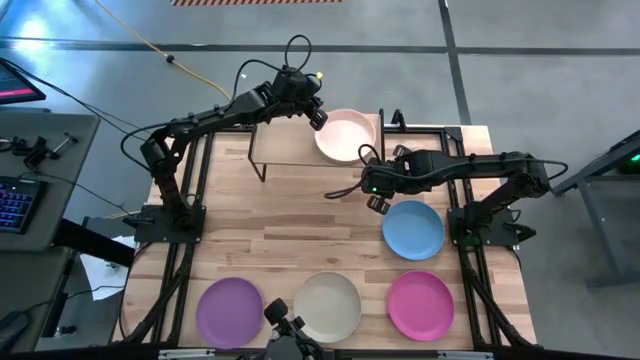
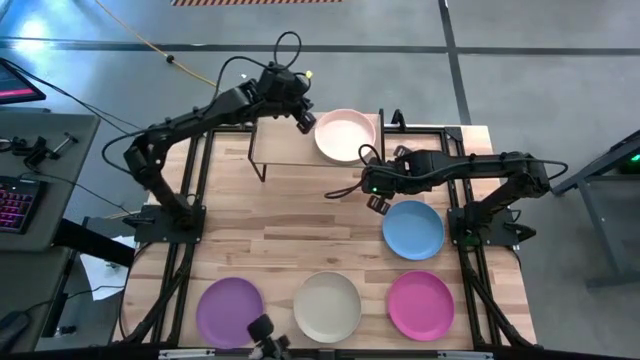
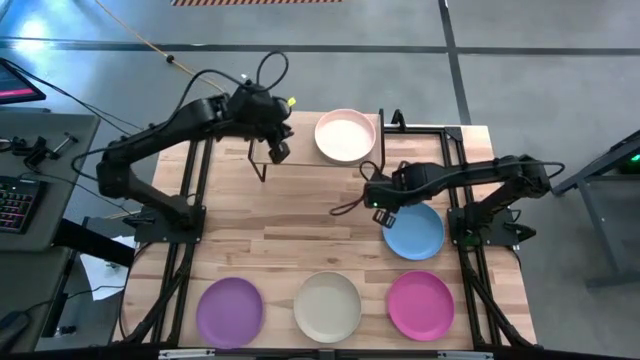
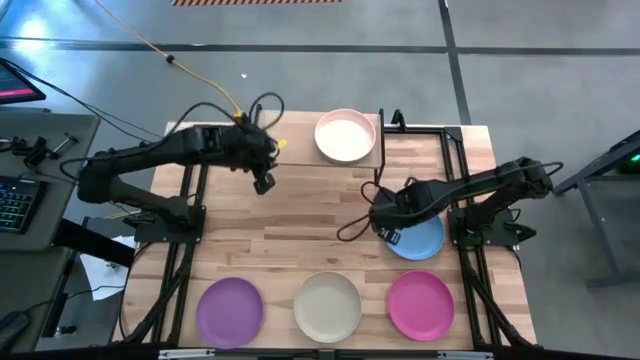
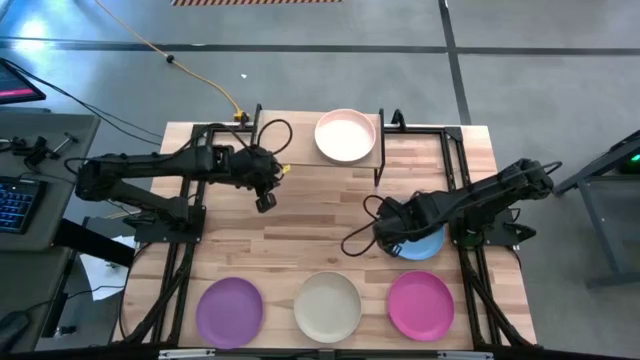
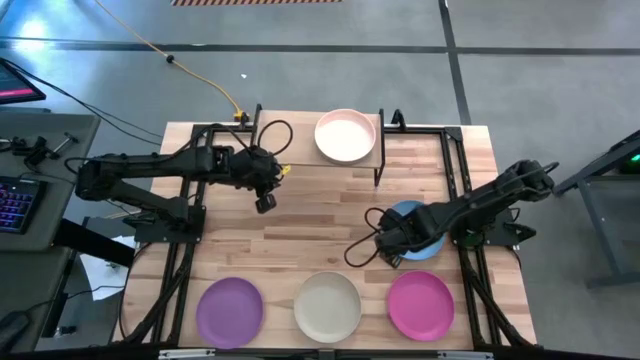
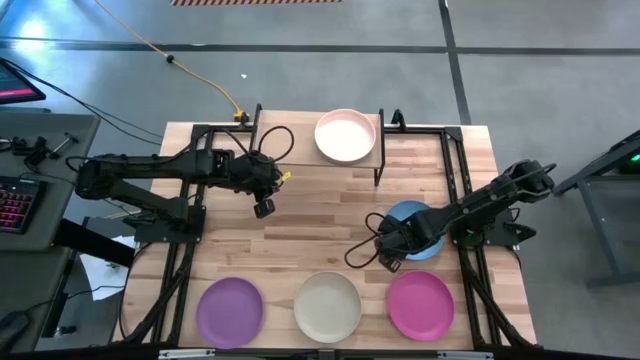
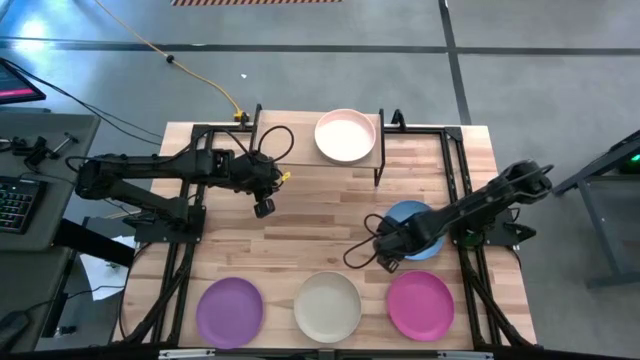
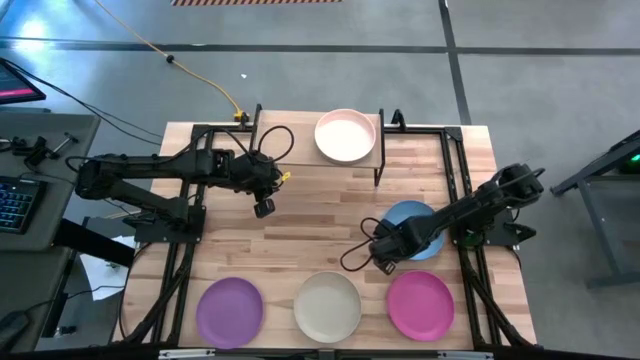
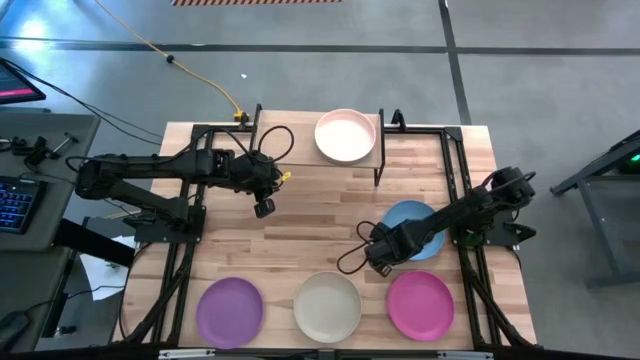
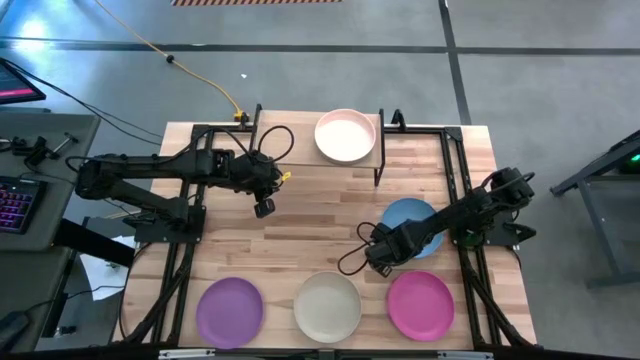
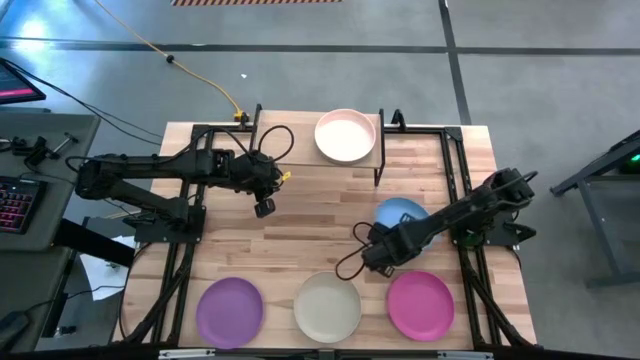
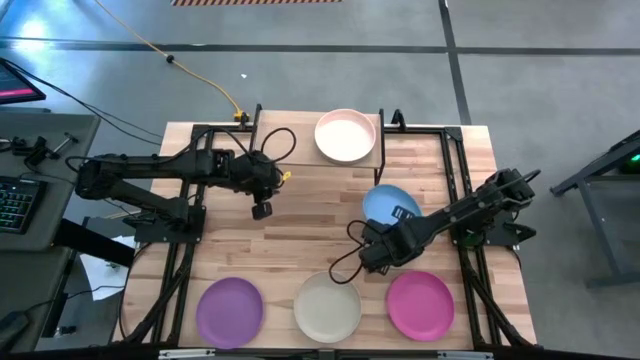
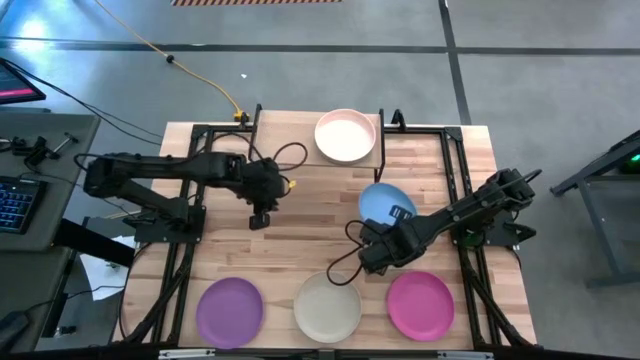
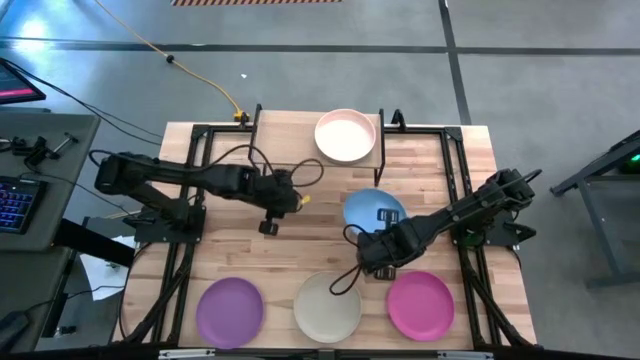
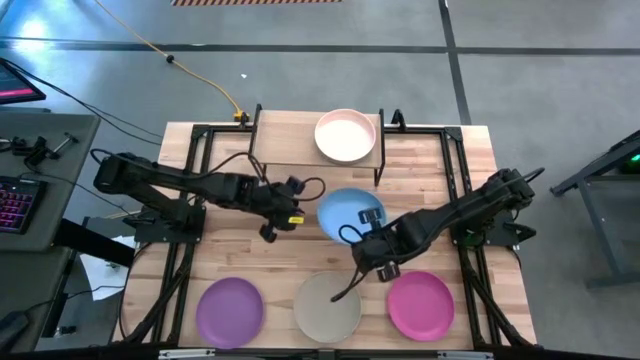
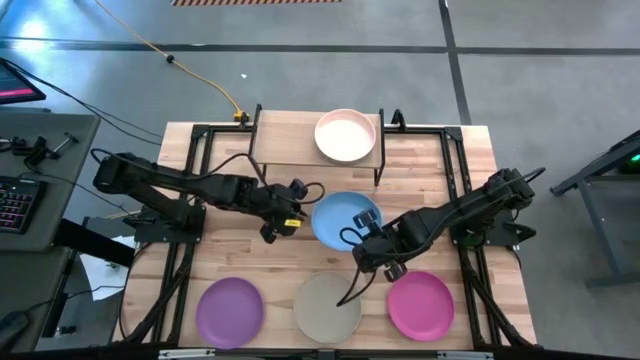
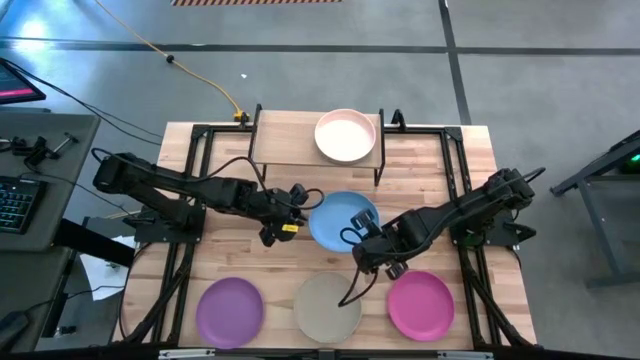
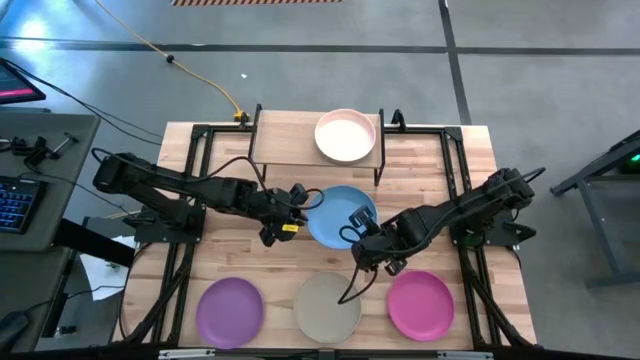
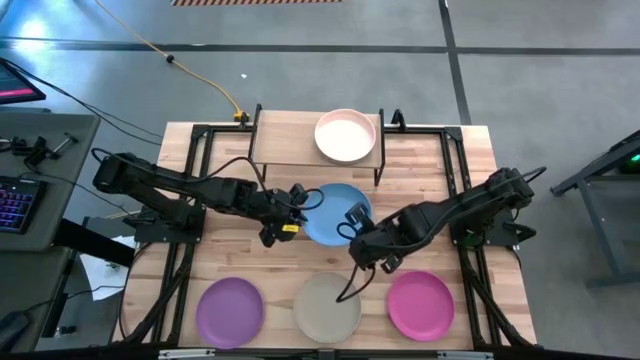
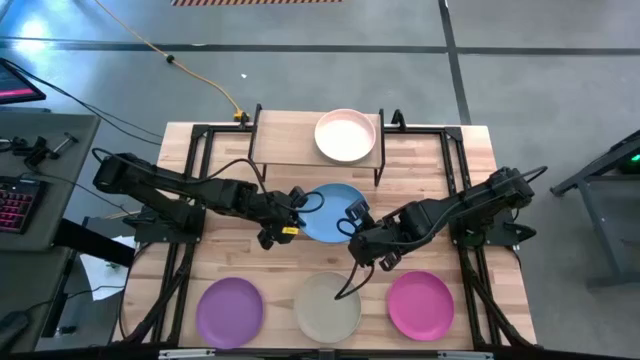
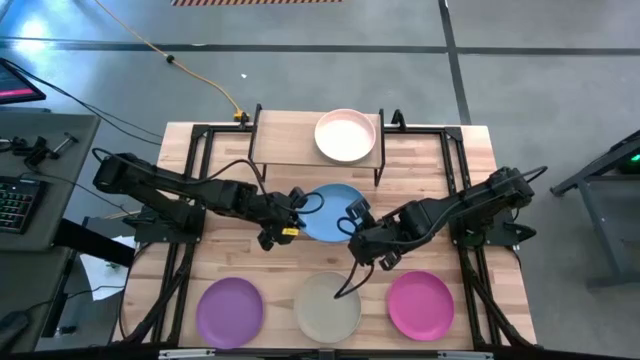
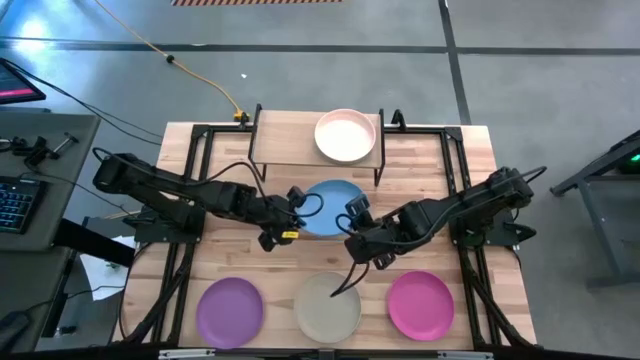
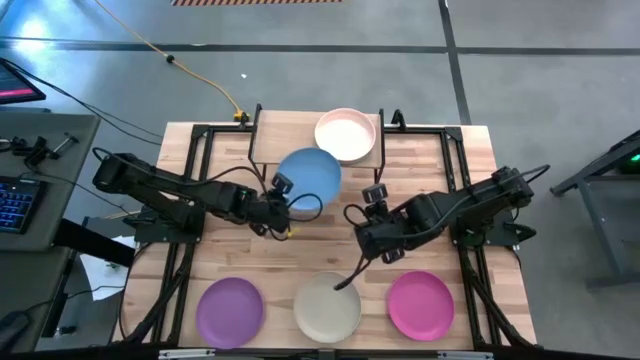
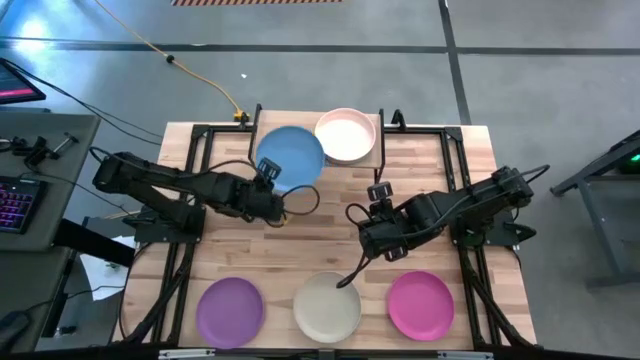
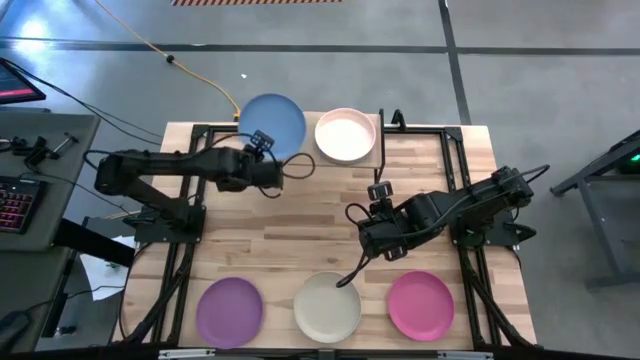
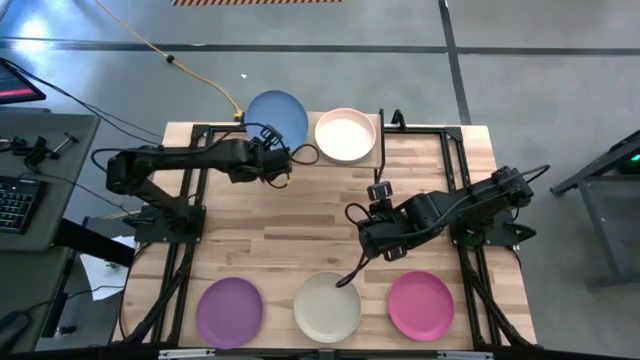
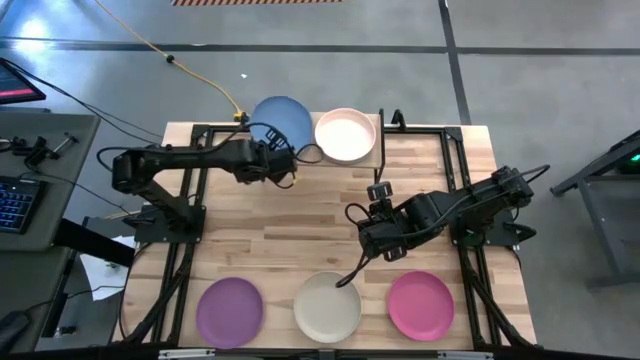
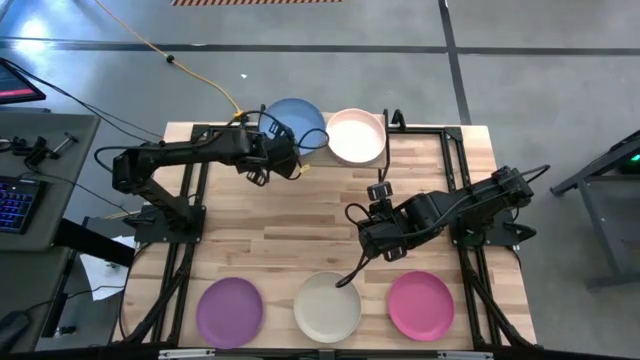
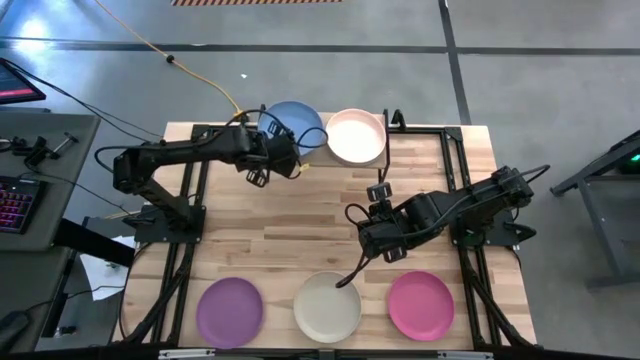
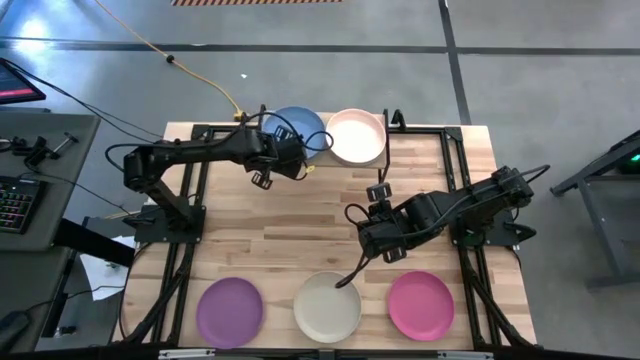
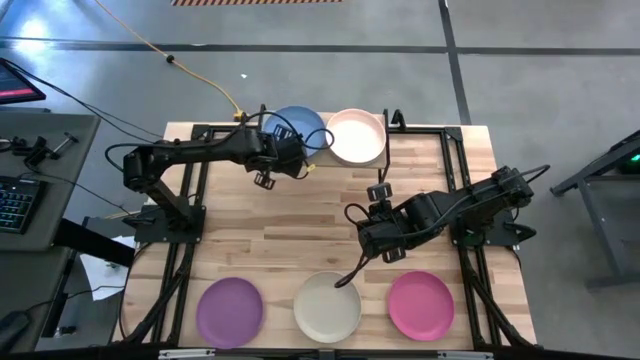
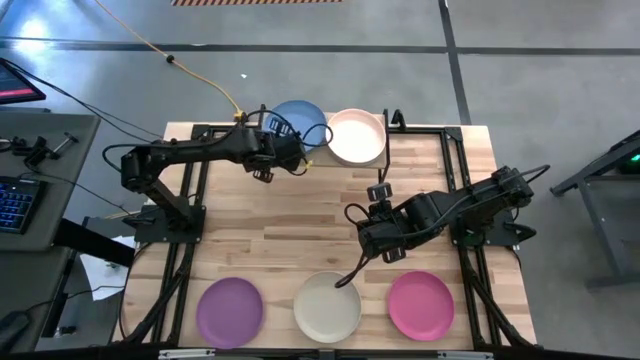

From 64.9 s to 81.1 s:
Task: Place and stack plates onto a shelf
Put the blue plate onto the shelf

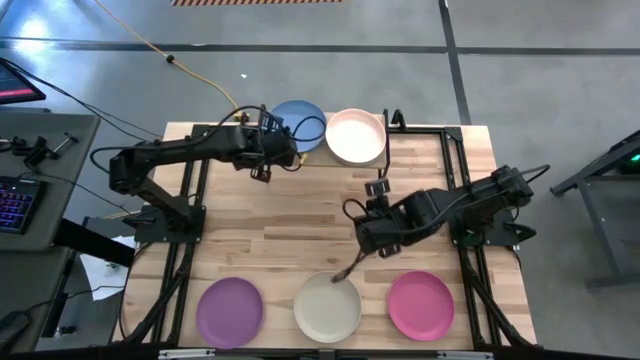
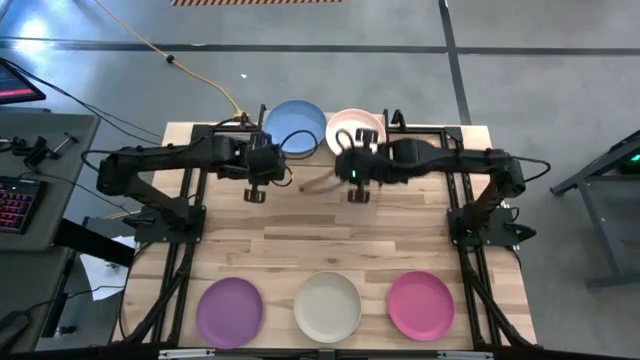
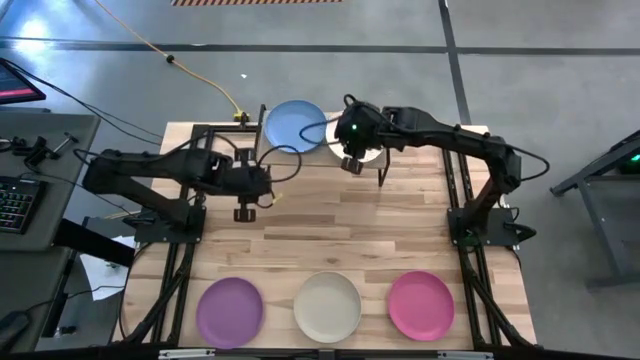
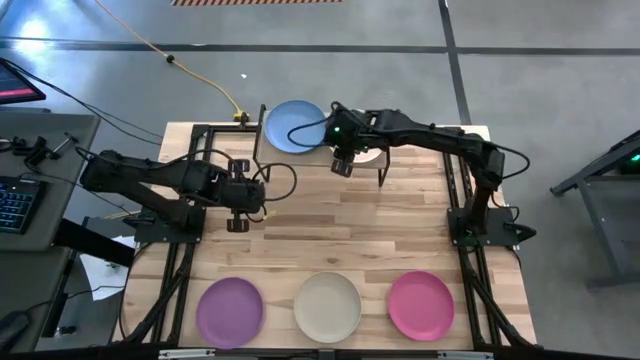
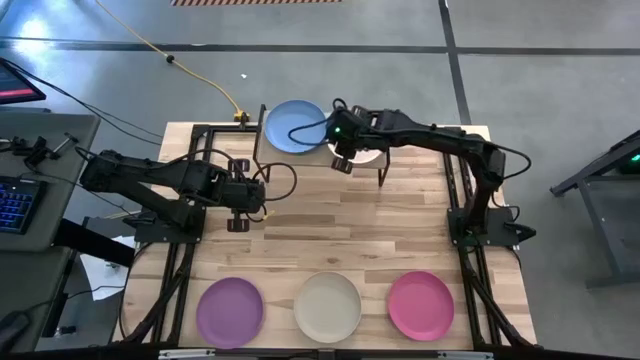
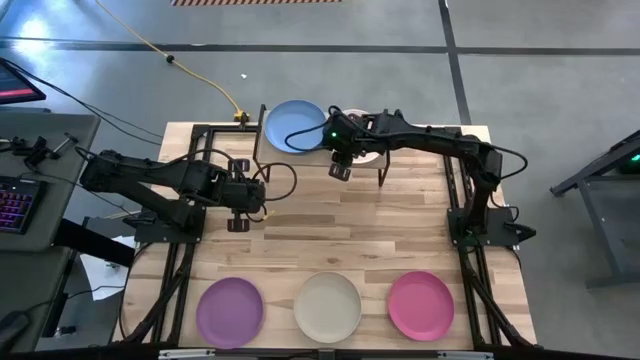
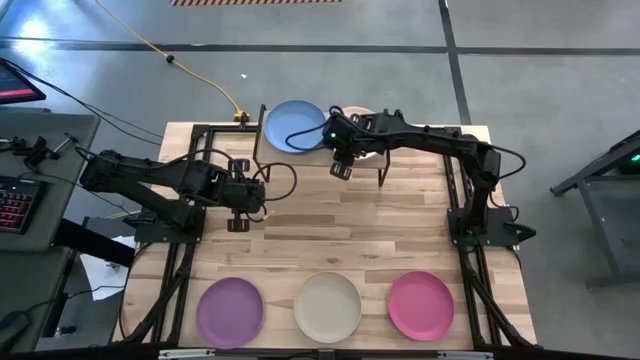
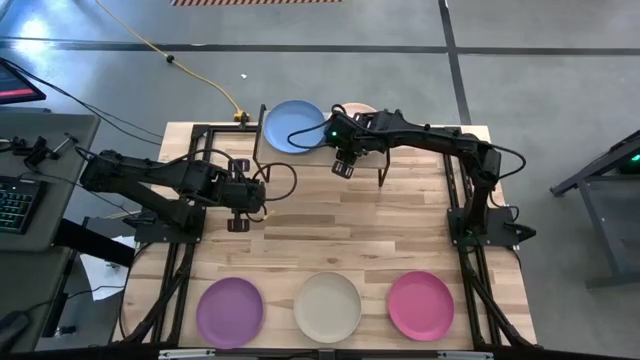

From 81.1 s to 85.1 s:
Adjust the right stack on the shelf

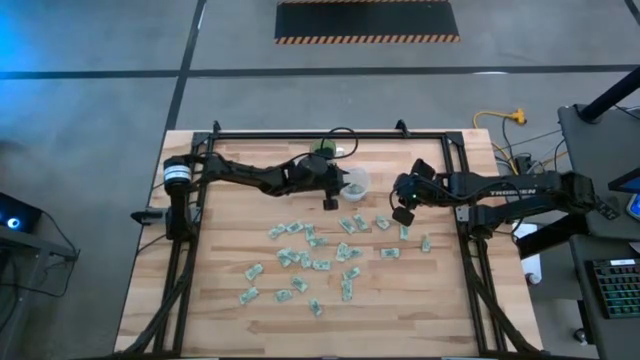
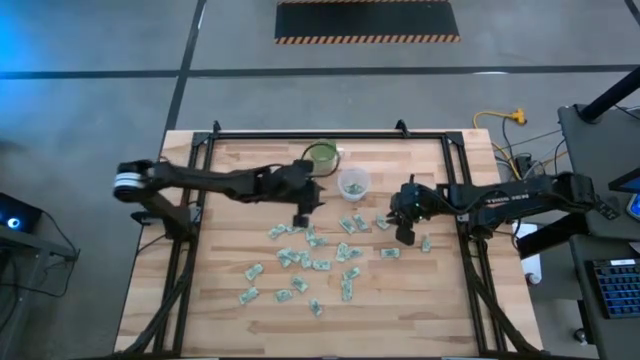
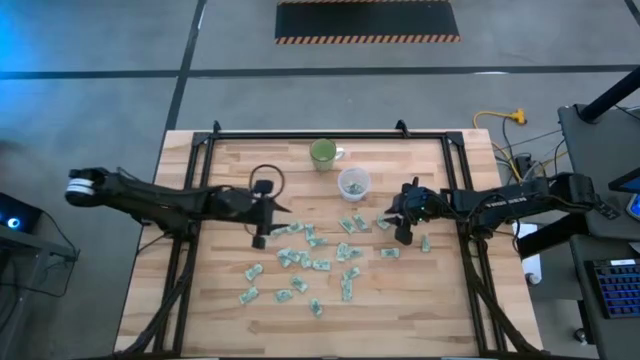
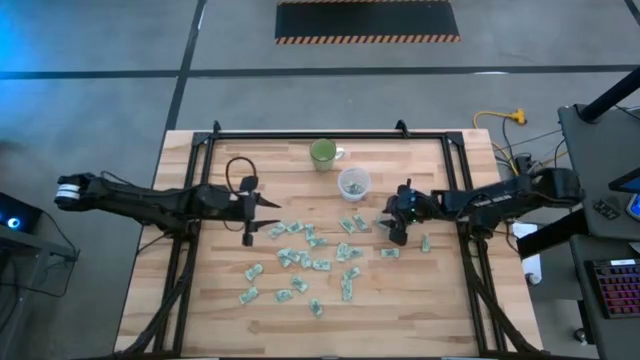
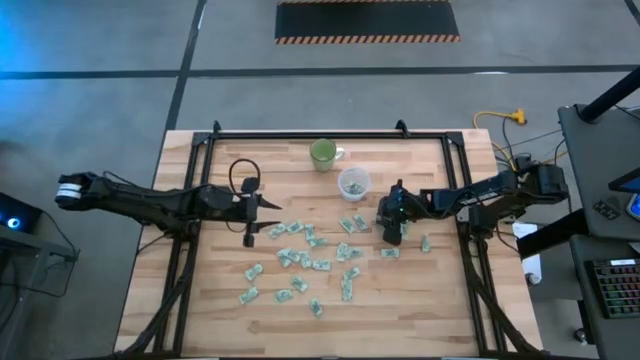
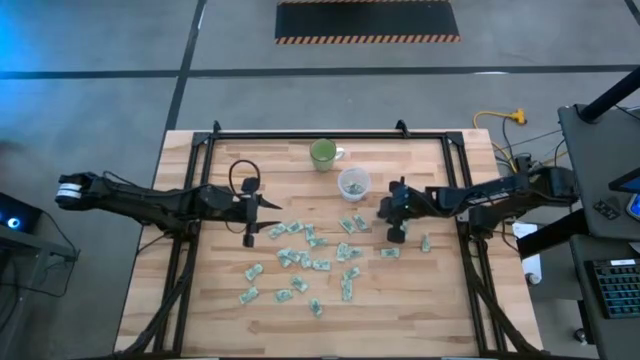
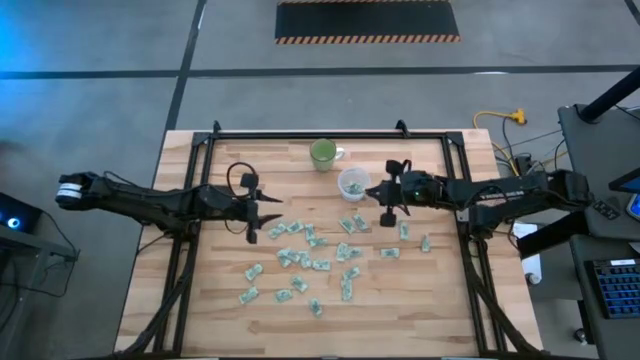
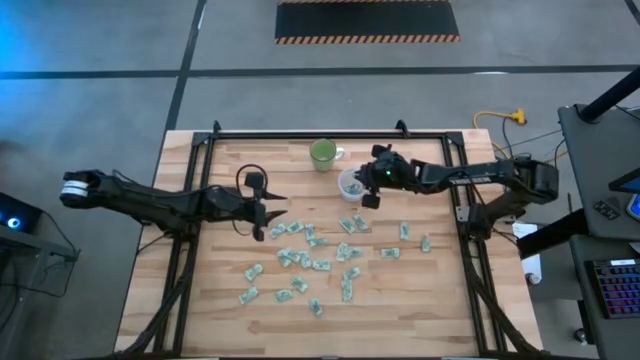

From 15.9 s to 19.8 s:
Task: Pick and place Stevia / Truvia into bins
Put the stevia packet into the transparent container
